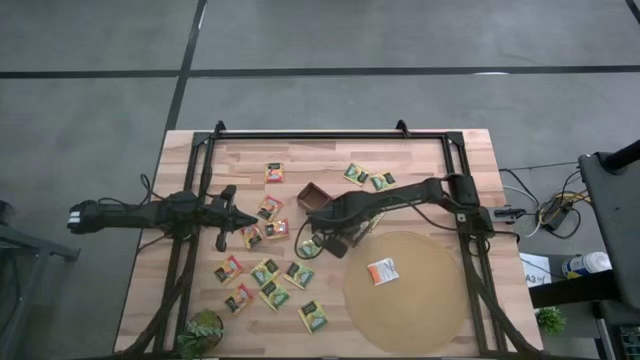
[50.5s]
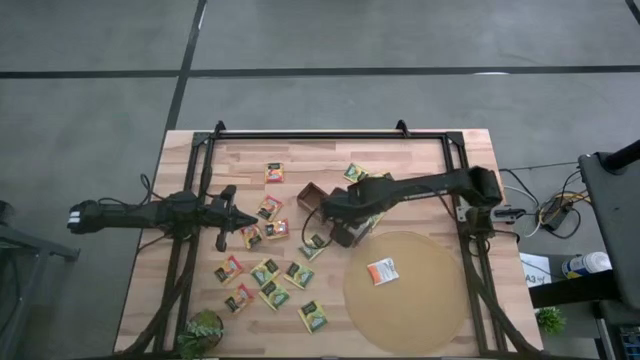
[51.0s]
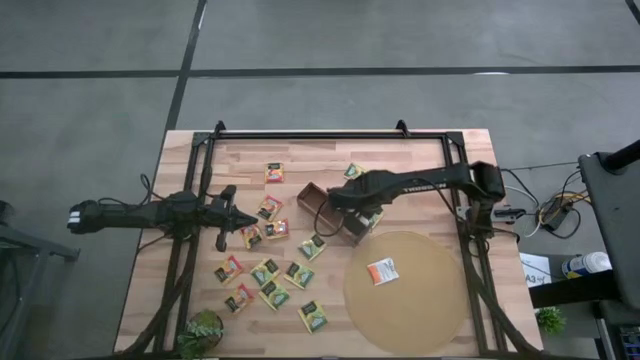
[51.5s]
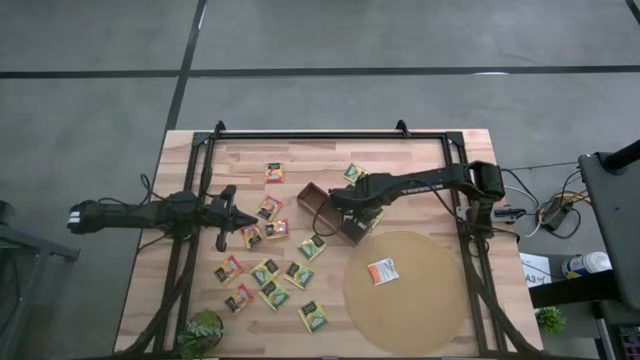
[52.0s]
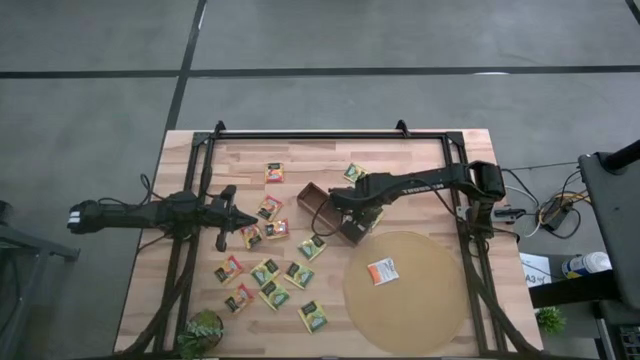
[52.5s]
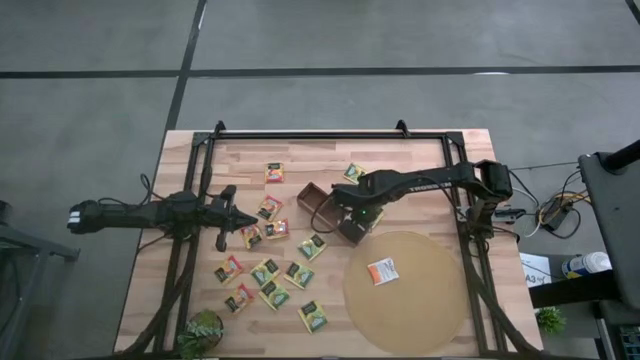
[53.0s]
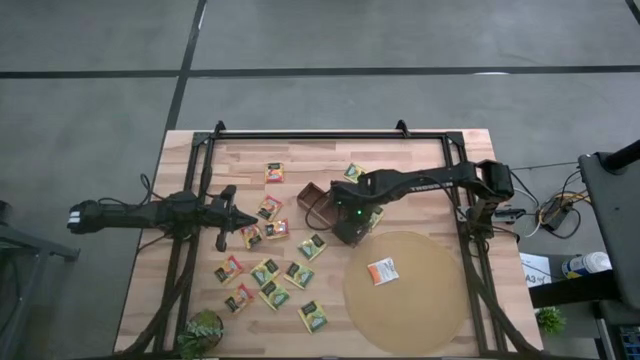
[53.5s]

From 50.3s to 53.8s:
Task: Pick & Place Tea
Adjust the white tea bags in the wooden organizer

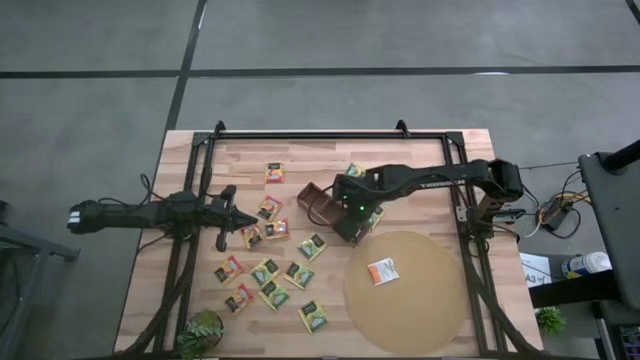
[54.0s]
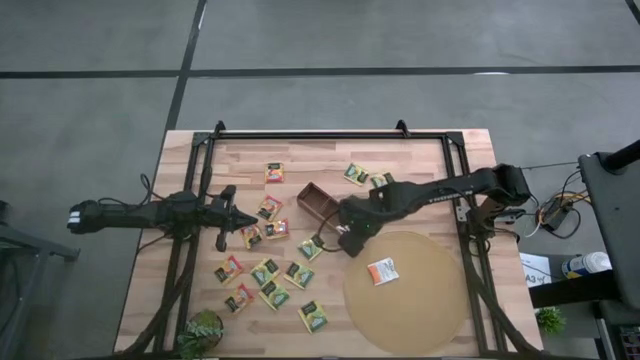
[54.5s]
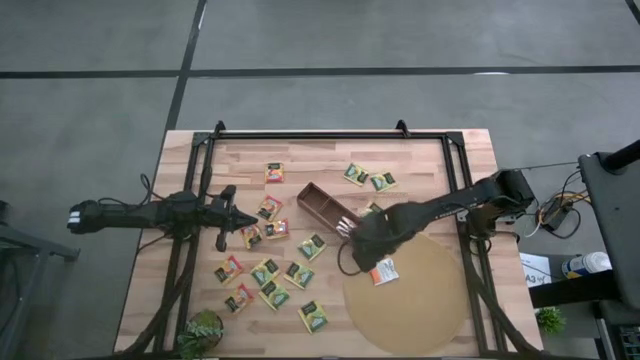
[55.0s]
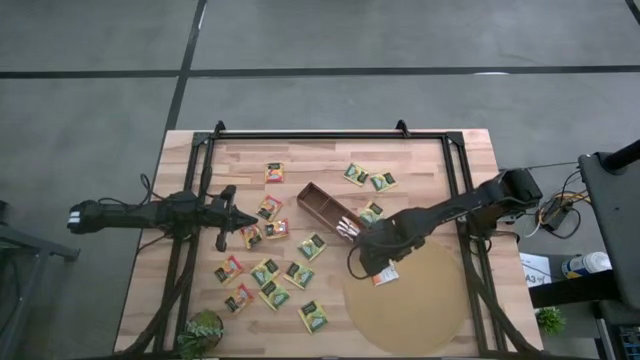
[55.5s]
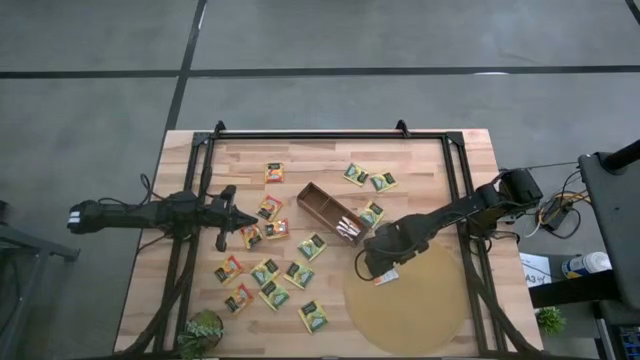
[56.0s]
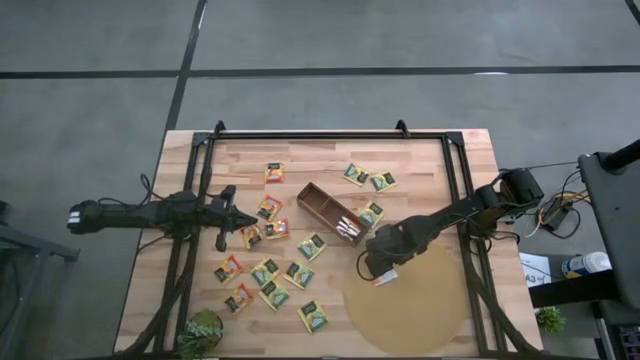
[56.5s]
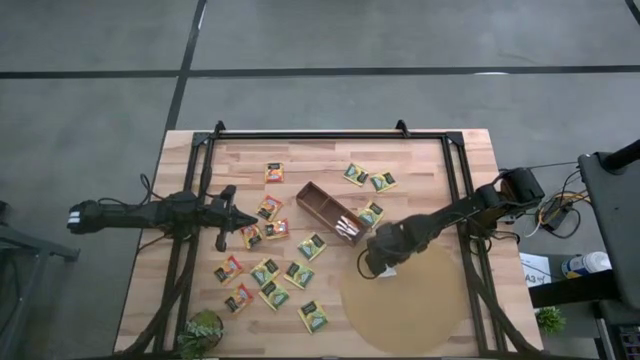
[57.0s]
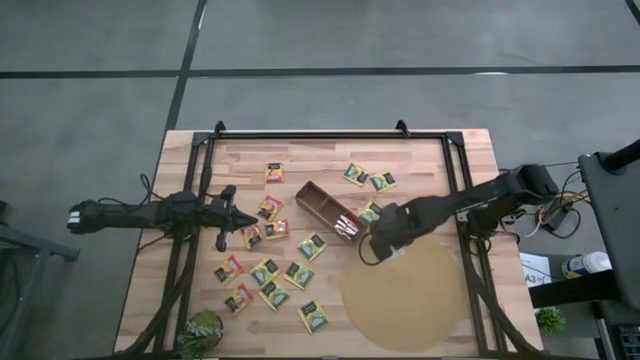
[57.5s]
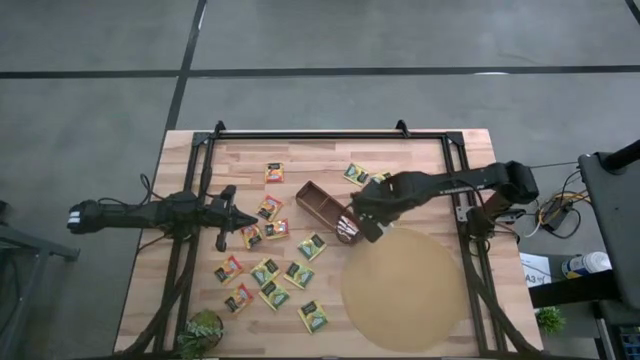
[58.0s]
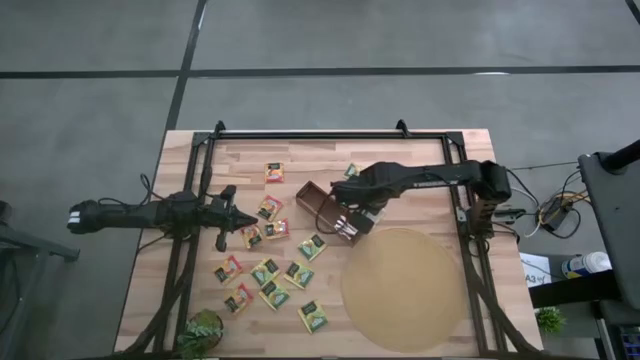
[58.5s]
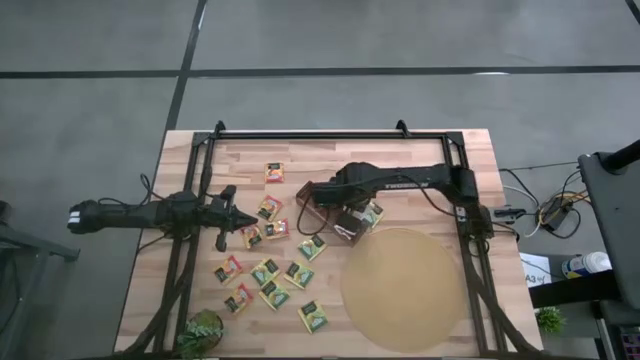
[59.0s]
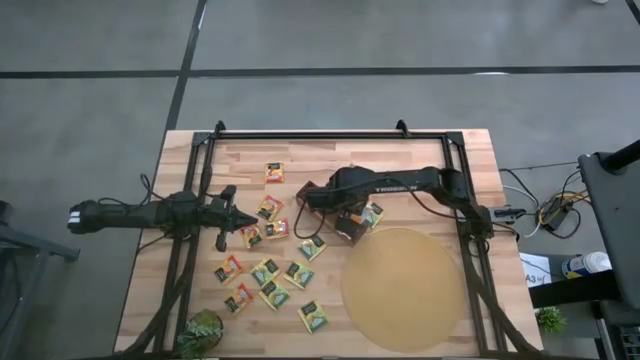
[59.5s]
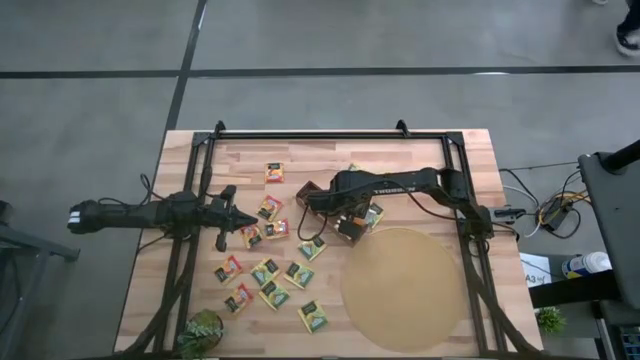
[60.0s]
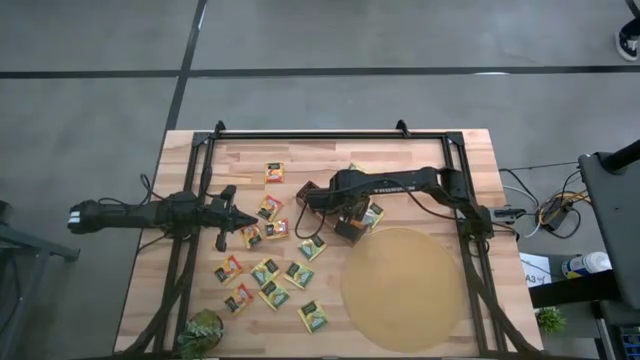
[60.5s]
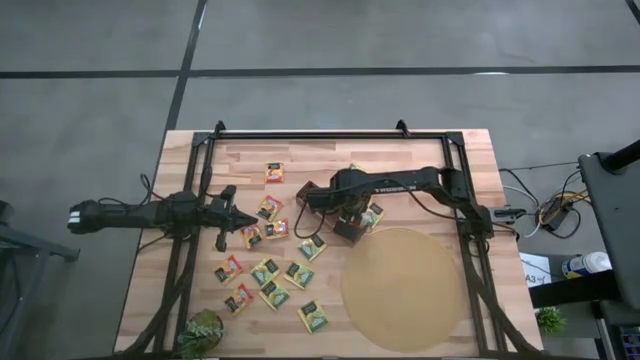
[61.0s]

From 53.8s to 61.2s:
Put the white tea bag into the right section of the wooden organizer

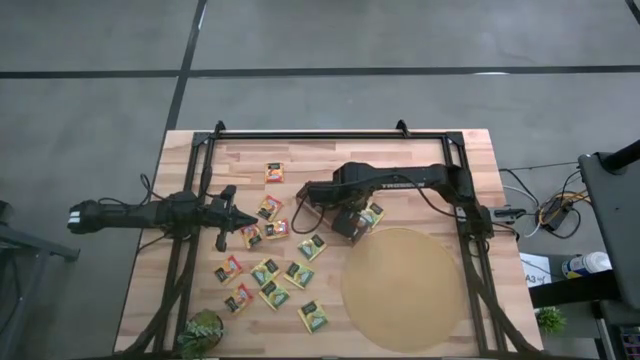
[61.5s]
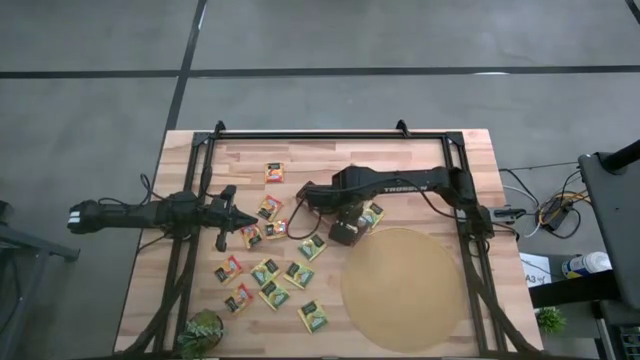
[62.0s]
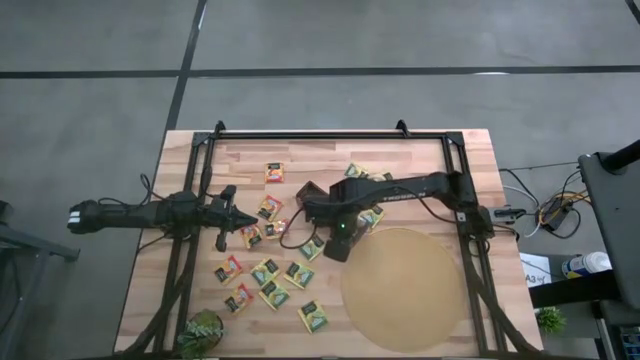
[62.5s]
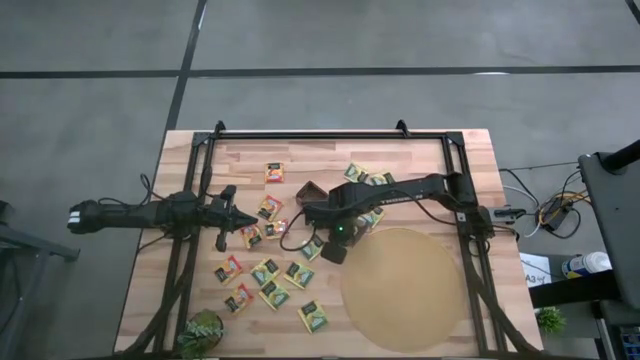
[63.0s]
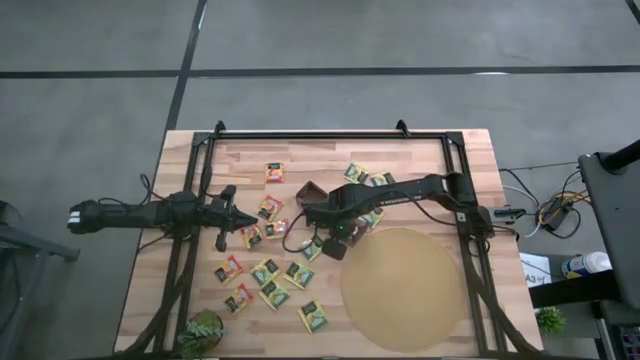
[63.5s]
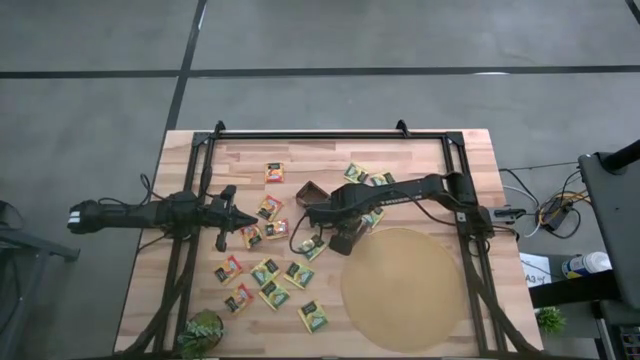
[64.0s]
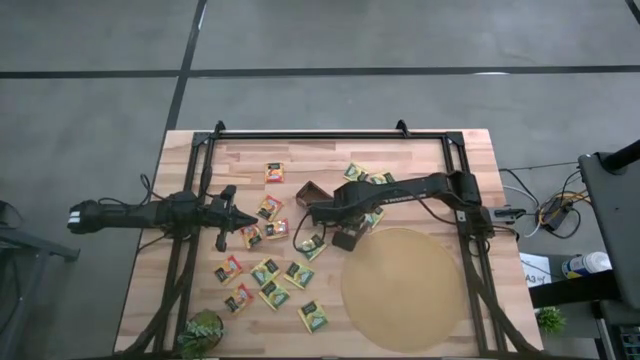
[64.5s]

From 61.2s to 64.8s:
Adjust the white tea bags in the wooden organizer

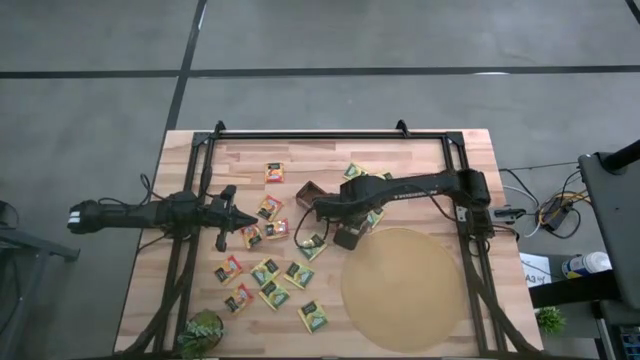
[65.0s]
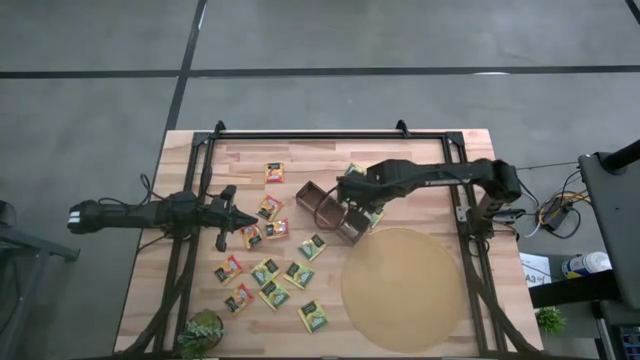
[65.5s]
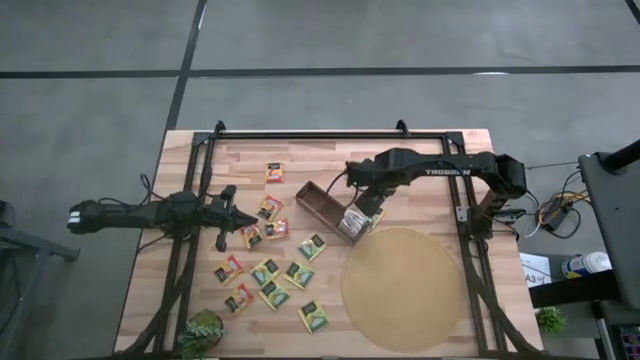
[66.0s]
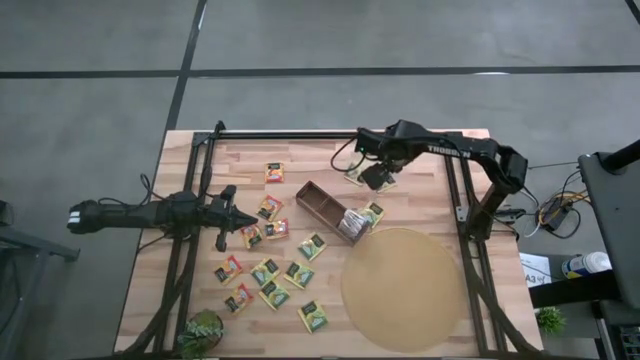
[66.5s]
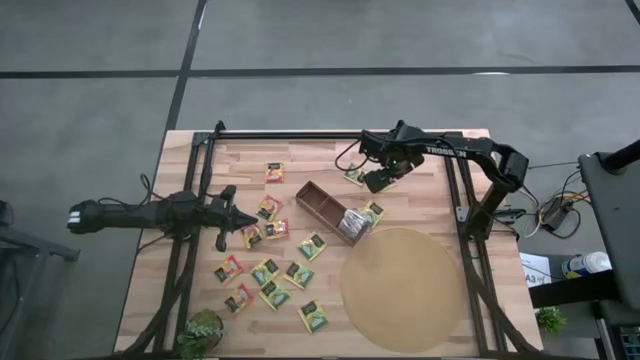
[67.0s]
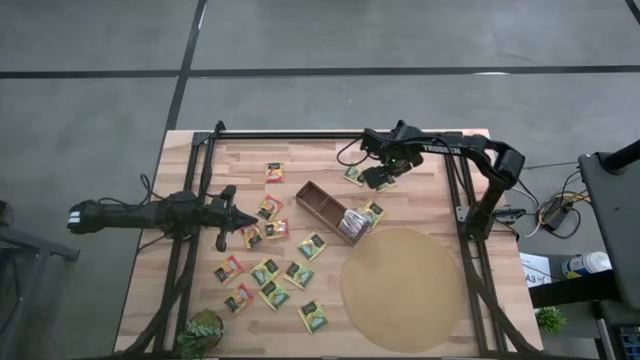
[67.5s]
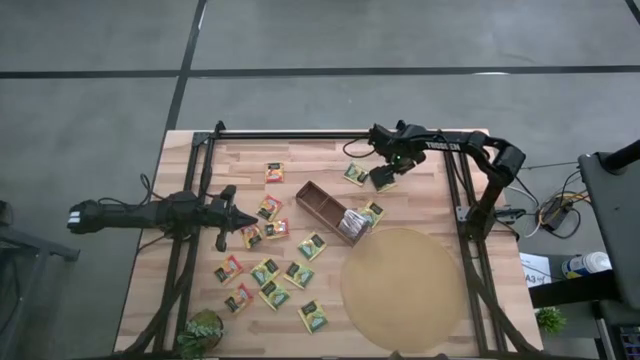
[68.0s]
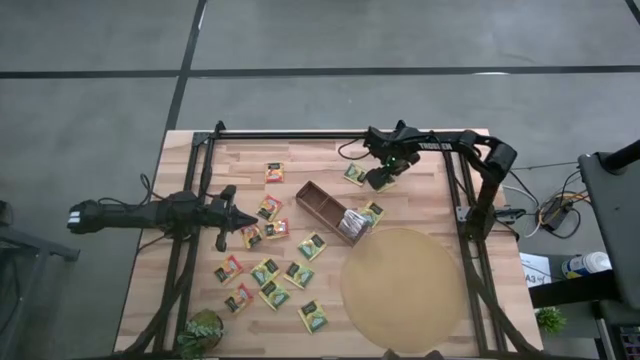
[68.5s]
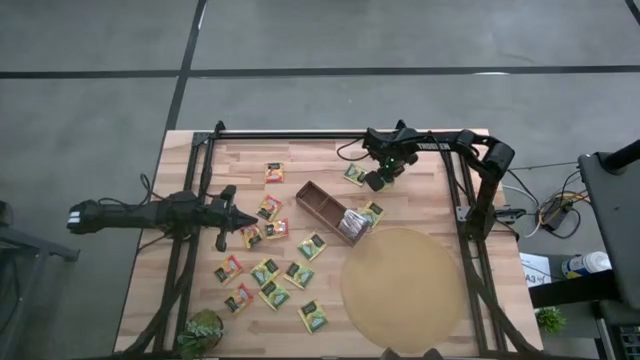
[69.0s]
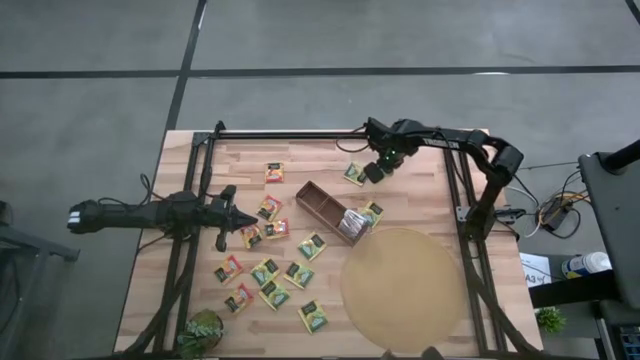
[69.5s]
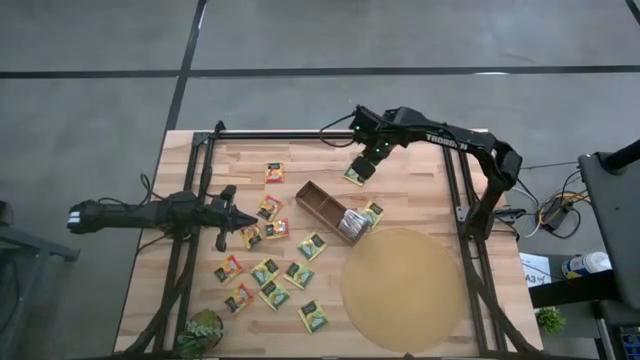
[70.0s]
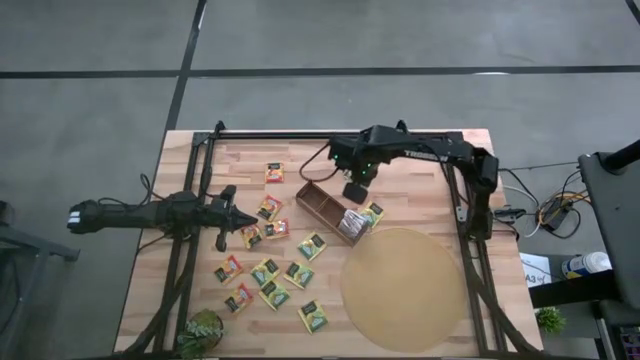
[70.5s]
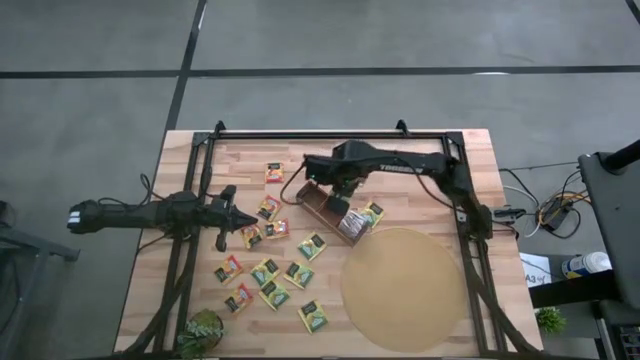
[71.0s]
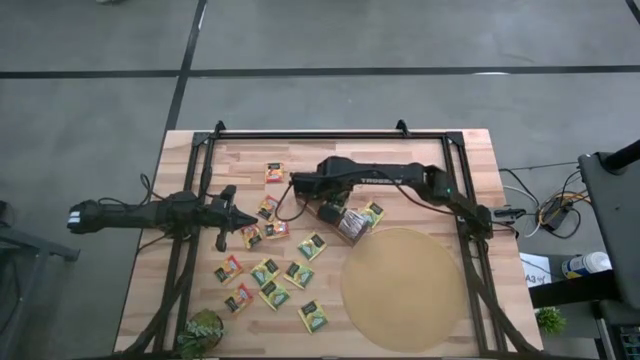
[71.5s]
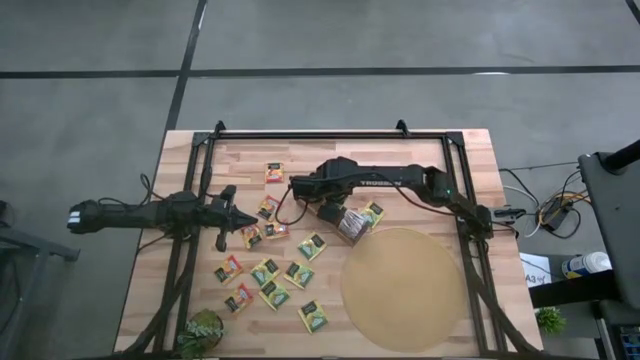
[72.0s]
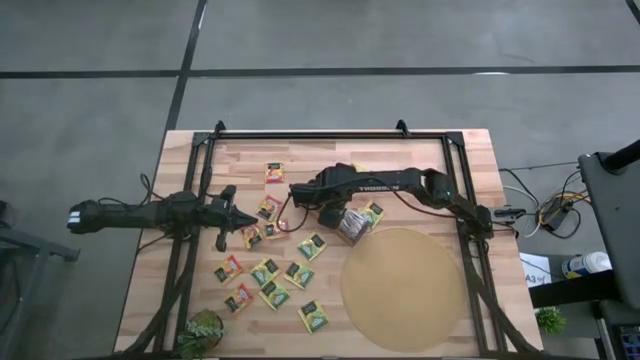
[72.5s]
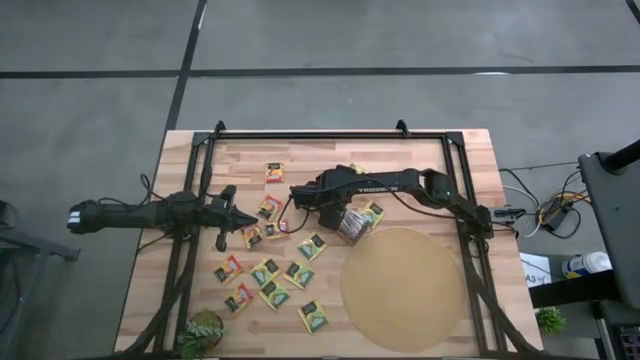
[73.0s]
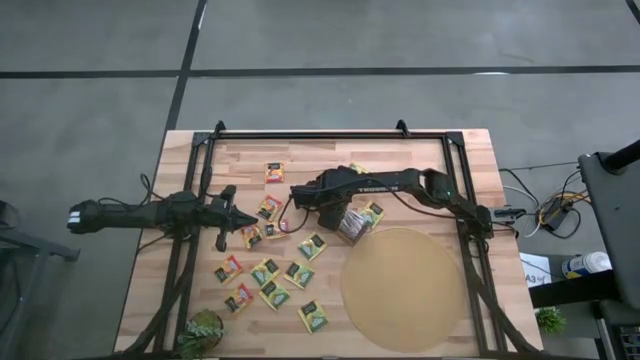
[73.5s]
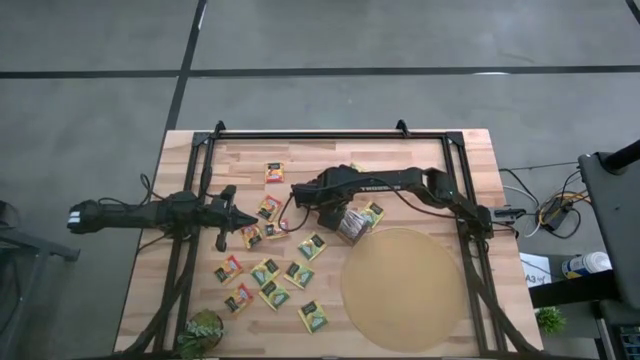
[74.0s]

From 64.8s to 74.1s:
Put the yellow tea bag into the middle section of the wooden organizer
